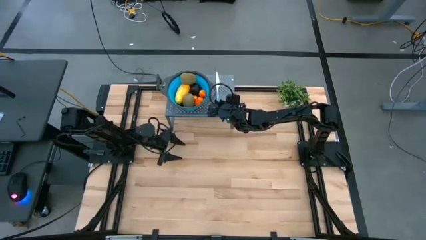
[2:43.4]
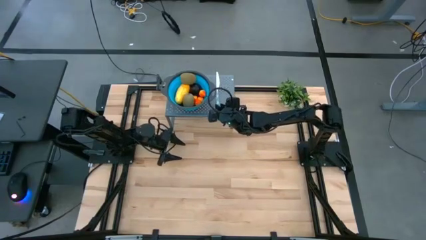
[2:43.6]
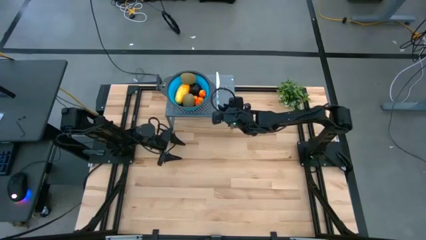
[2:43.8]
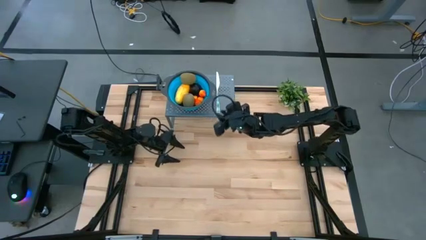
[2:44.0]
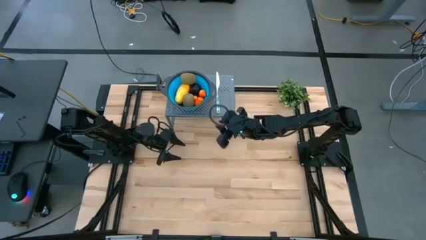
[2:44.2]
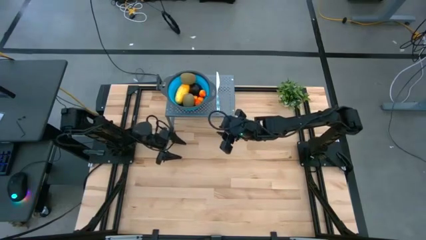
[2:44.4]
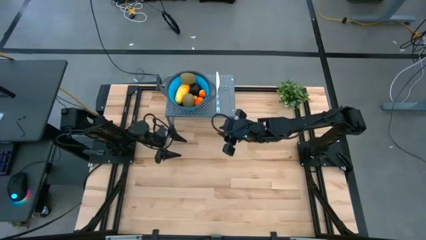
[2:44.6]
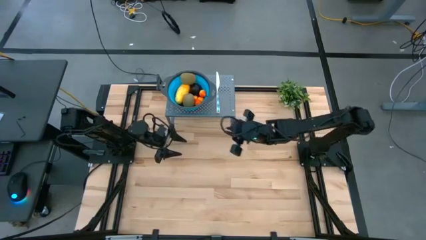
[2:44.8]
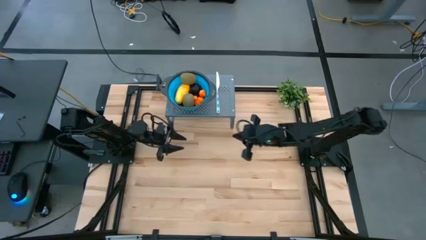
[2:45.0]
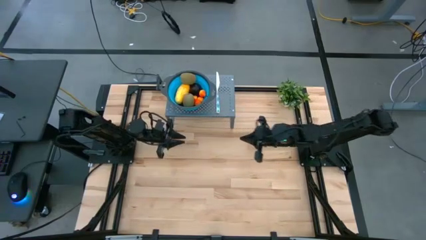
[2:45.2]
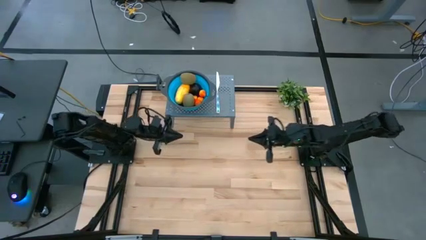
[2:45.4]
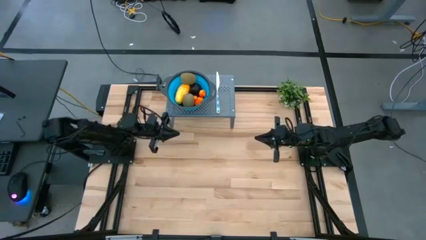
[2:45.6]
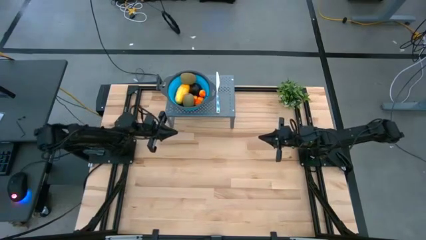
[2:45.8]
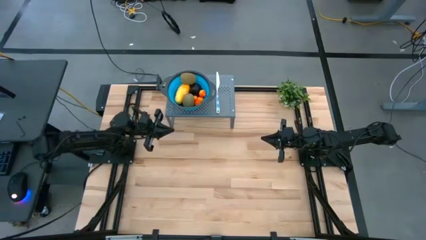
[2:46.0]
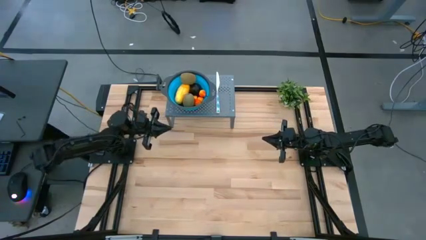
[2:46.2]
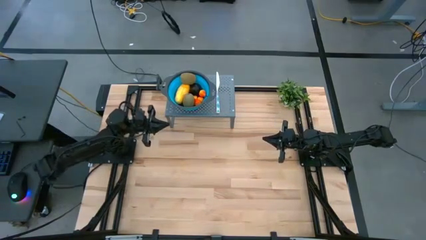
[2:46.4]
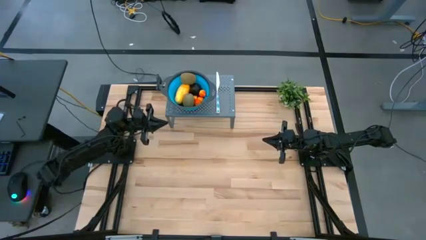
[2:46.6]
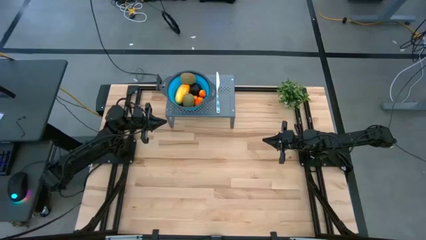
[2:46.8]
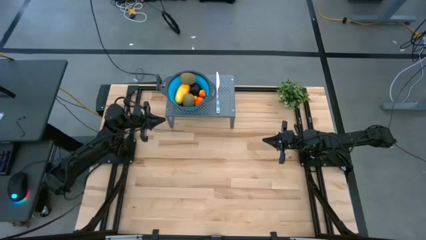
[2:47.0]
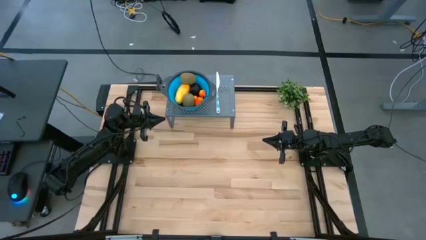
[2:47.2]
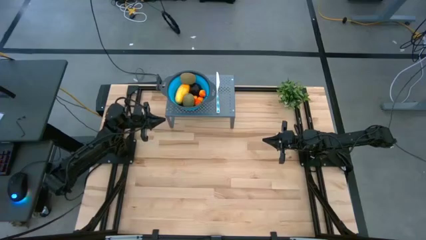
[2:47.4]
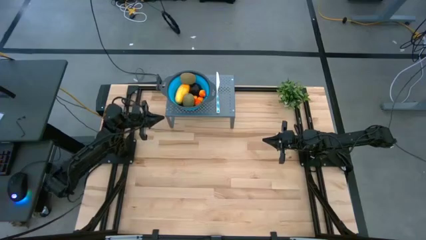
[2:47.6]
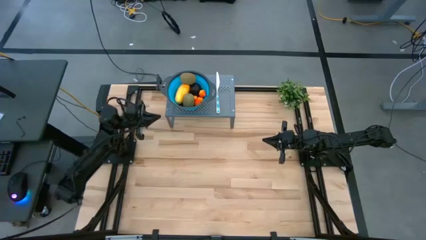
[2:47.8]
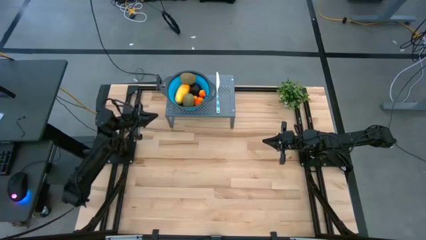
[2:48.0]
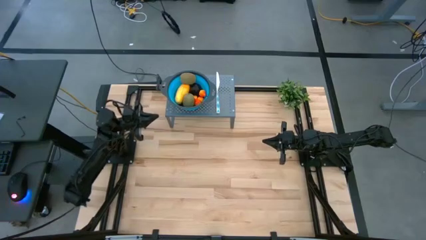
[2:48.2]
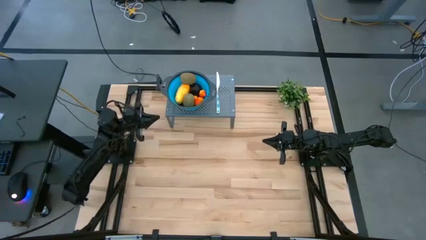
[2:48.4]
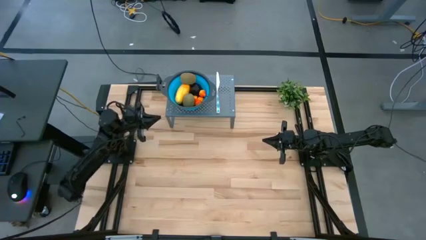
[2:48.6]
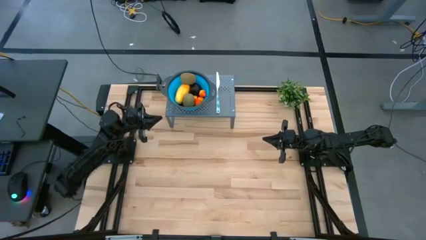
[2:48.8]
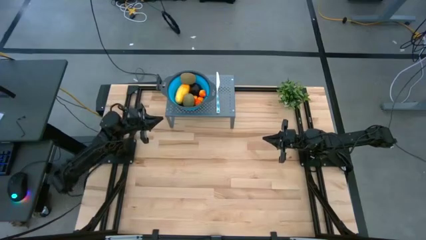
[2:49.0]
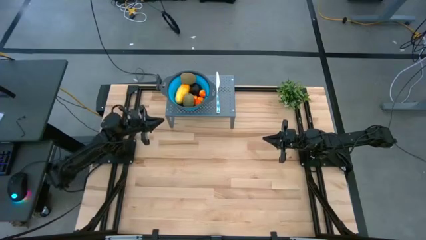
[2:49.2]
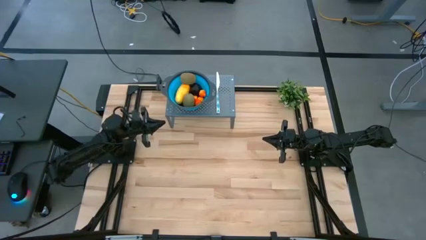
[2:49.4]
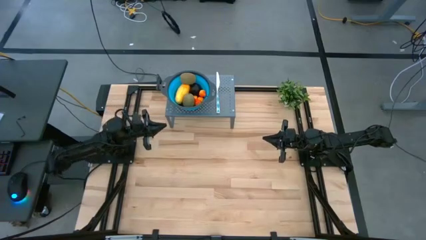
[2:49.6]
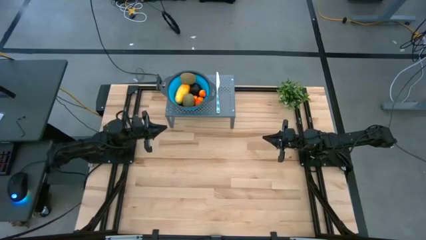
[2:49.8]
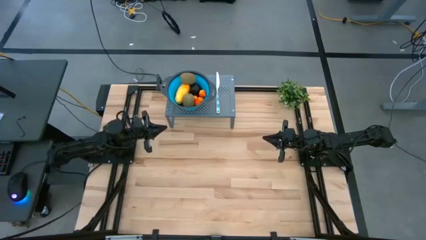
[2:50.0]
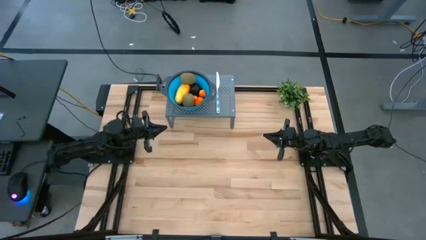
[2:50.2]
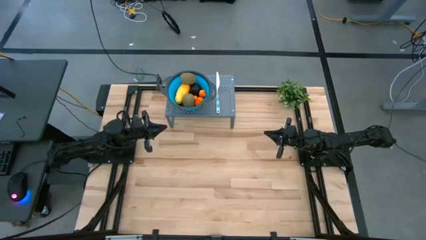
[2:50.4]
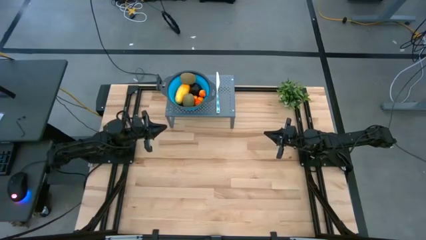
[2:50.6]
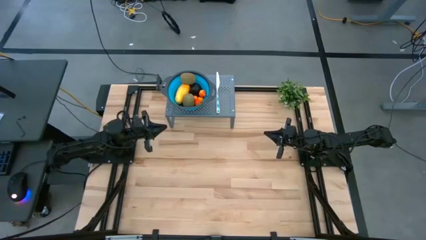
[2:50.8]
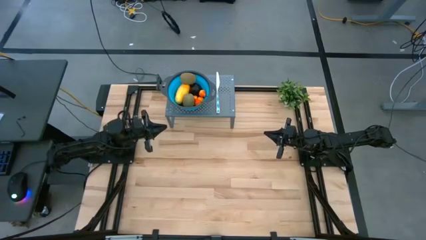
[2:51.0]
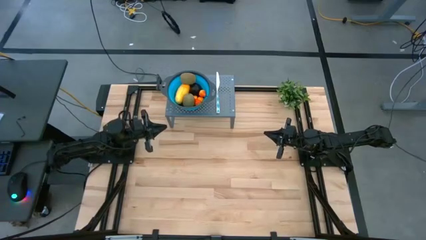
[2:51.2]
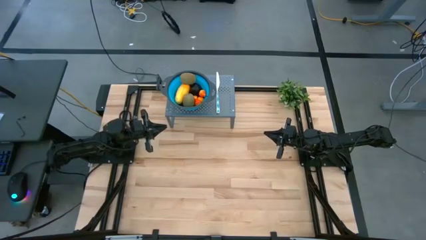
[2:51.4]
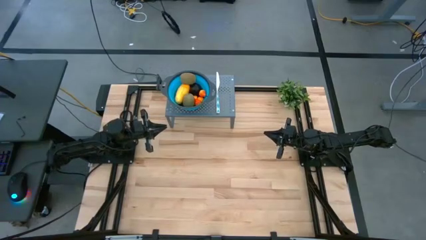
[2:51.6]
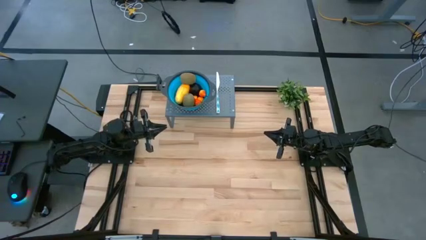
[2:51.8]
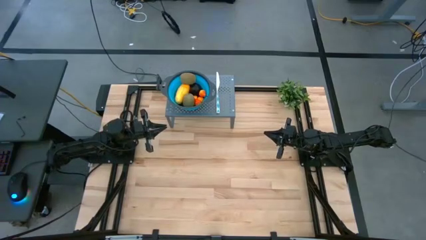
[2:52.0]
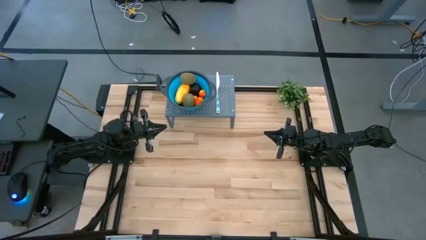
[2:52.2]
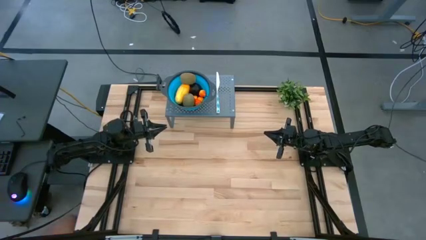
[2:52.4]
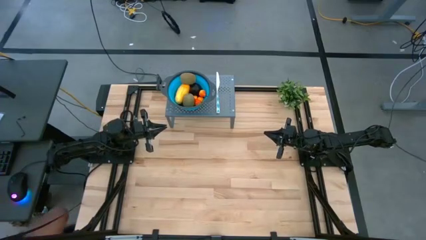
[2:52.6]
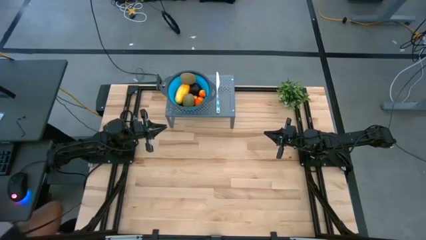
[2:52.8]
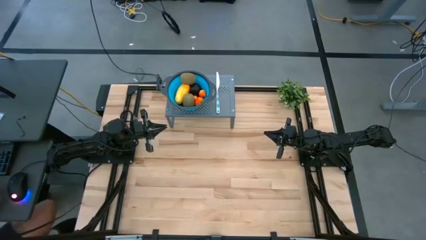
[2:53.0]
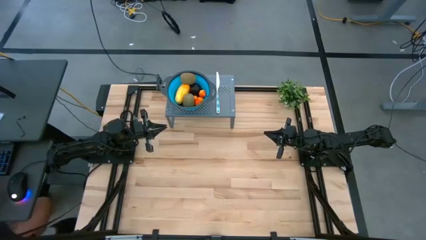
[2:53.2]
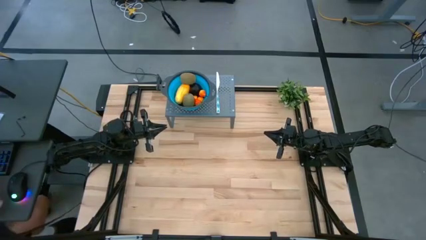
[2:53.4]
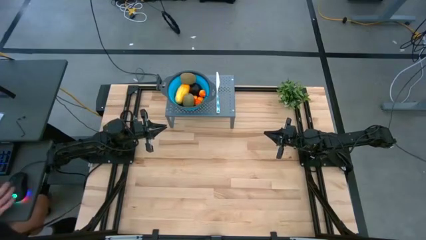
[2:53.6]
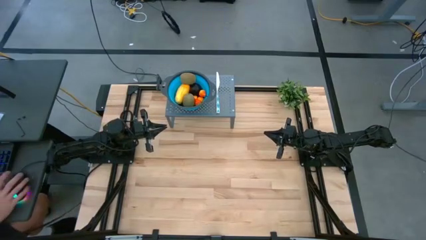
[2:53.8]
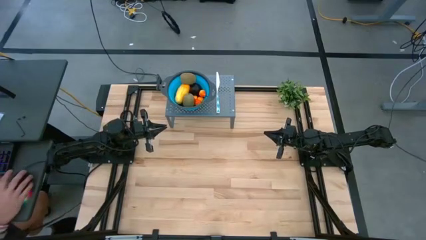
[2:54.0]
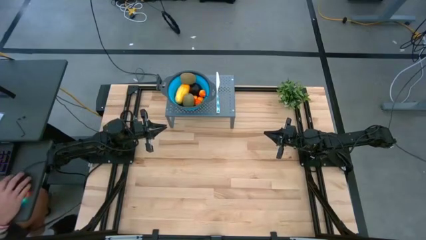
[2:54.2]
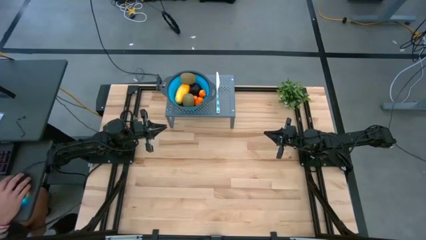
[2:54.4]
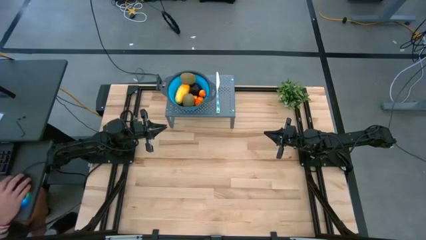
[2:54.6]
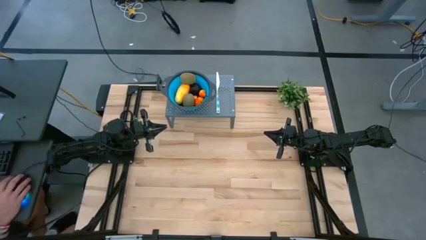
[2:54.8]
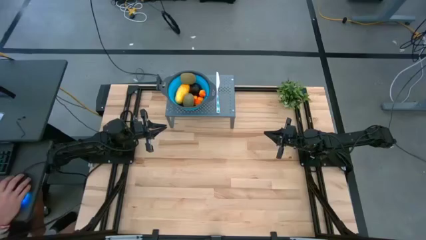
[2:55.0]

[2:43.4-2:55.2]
Task: Pick & Place Fruit
Return to Home Position
